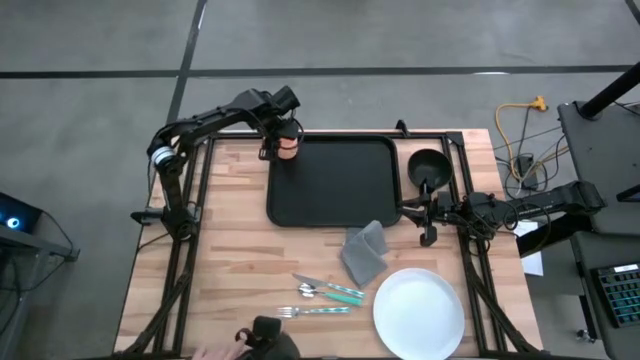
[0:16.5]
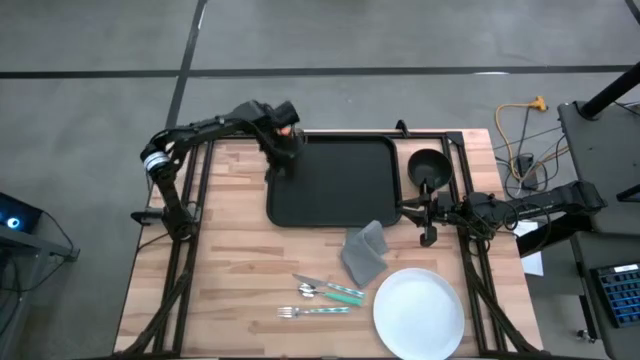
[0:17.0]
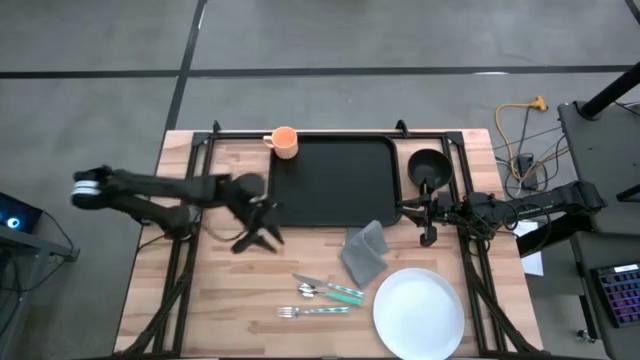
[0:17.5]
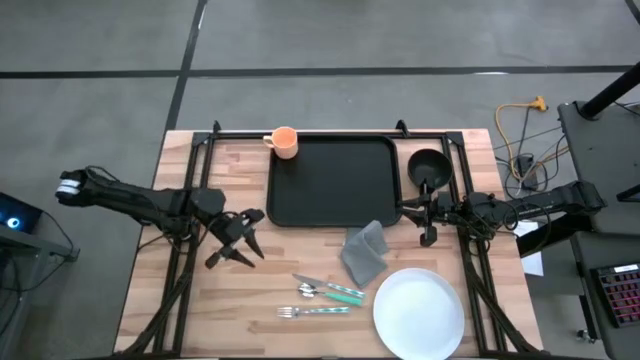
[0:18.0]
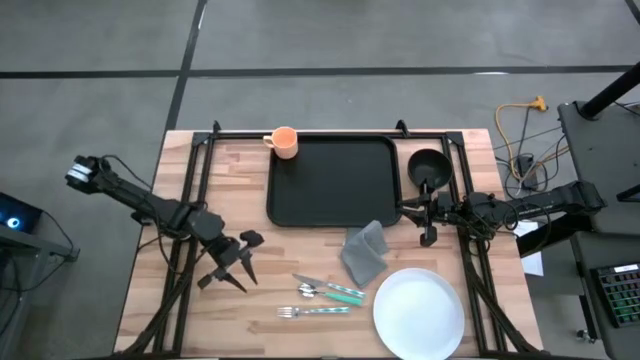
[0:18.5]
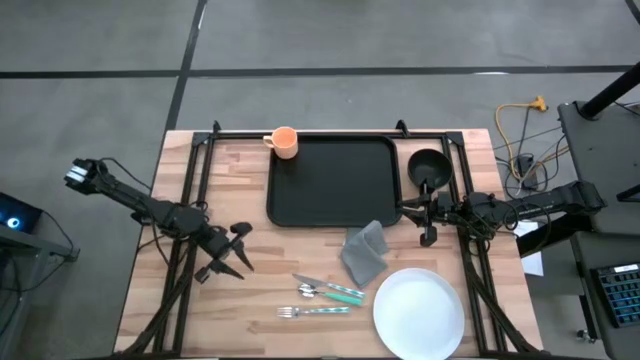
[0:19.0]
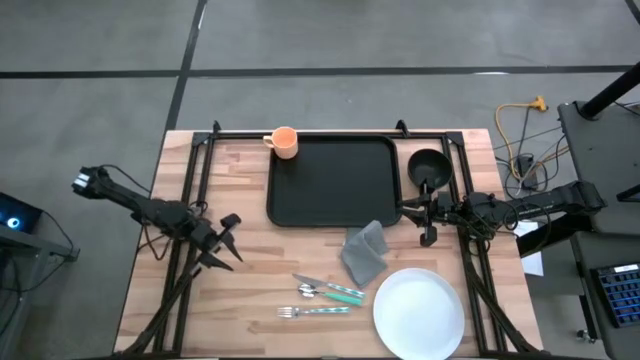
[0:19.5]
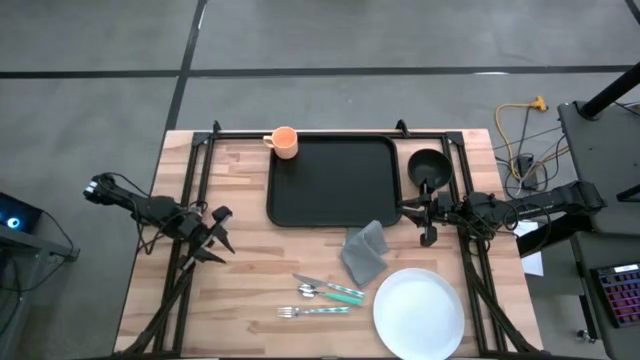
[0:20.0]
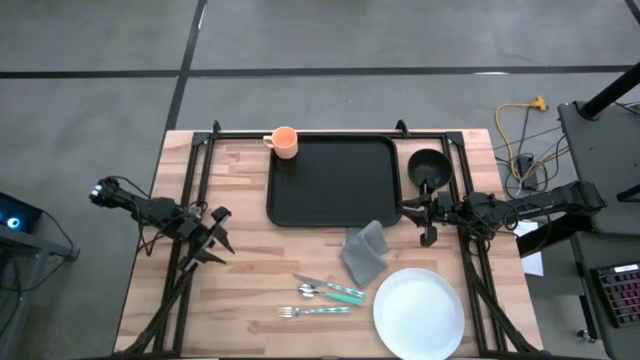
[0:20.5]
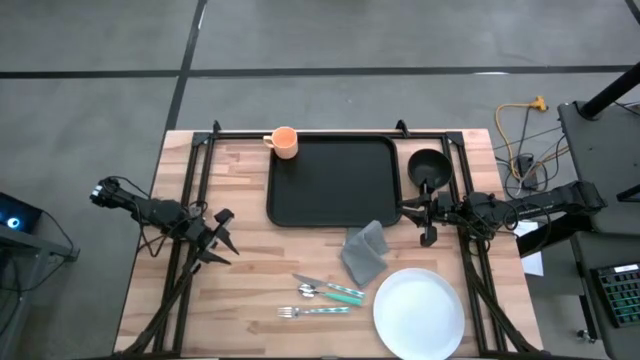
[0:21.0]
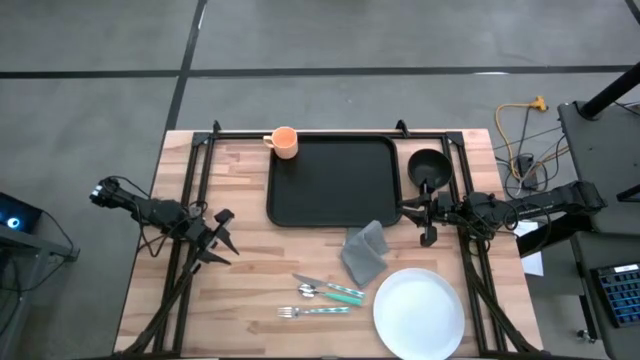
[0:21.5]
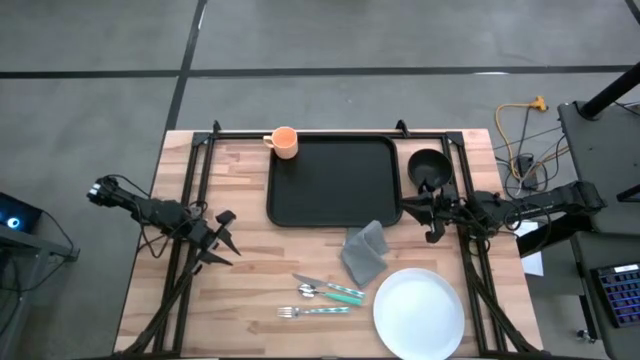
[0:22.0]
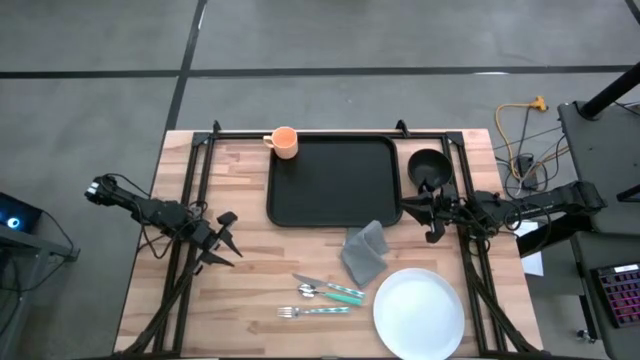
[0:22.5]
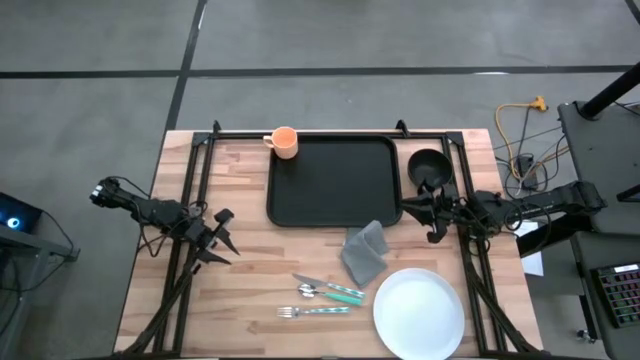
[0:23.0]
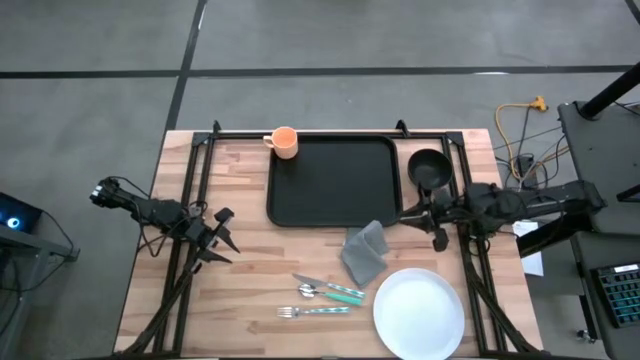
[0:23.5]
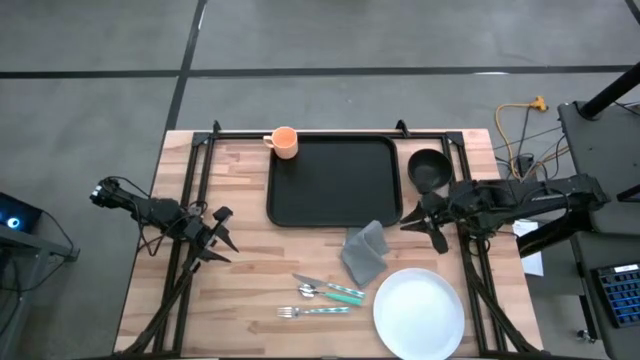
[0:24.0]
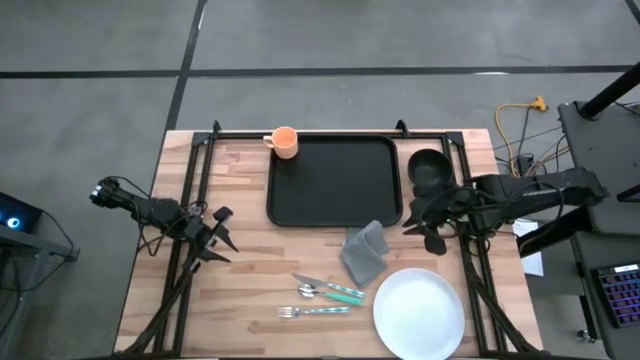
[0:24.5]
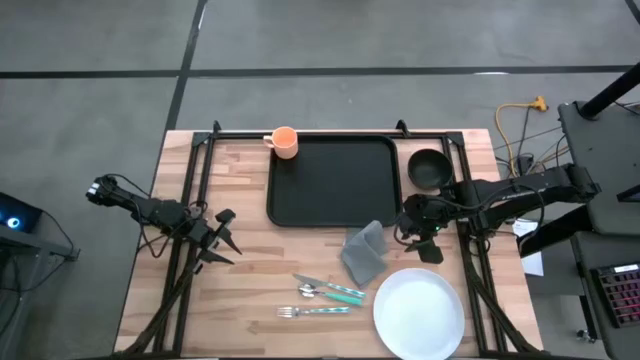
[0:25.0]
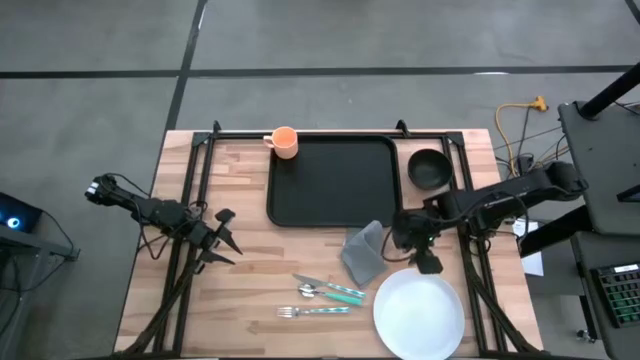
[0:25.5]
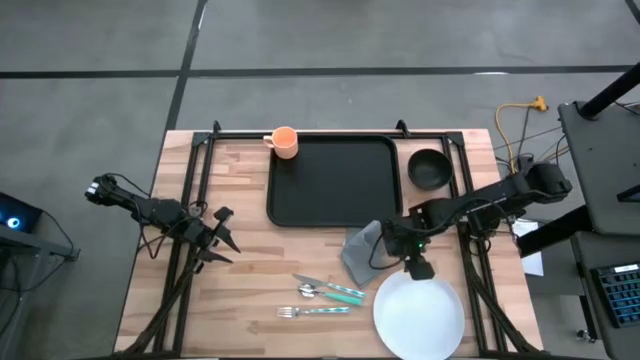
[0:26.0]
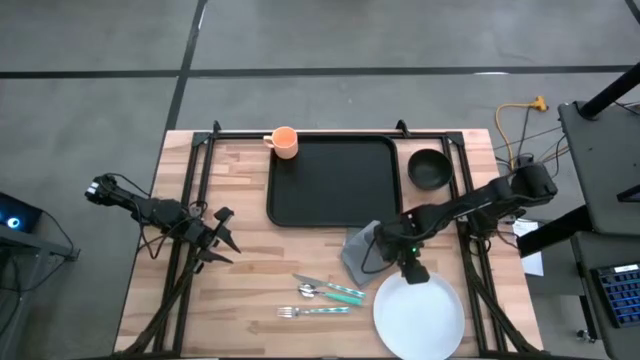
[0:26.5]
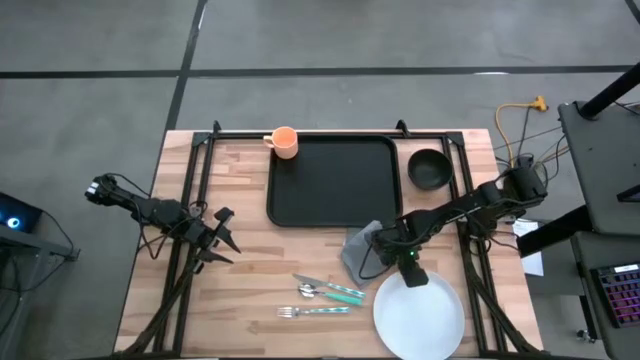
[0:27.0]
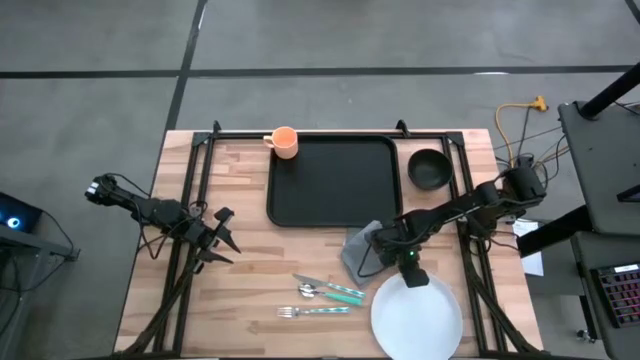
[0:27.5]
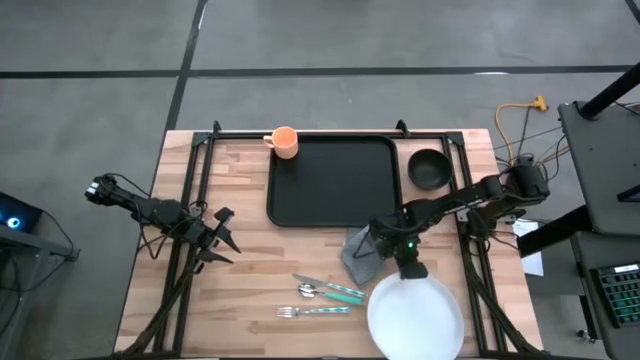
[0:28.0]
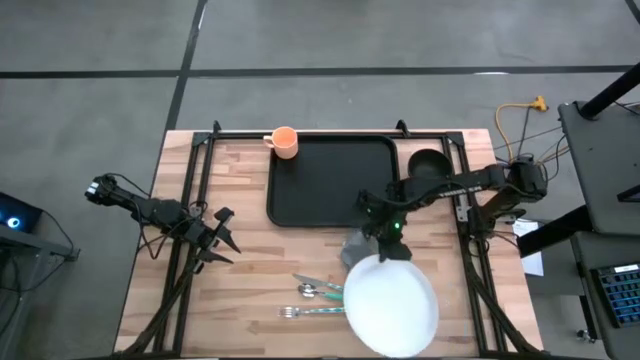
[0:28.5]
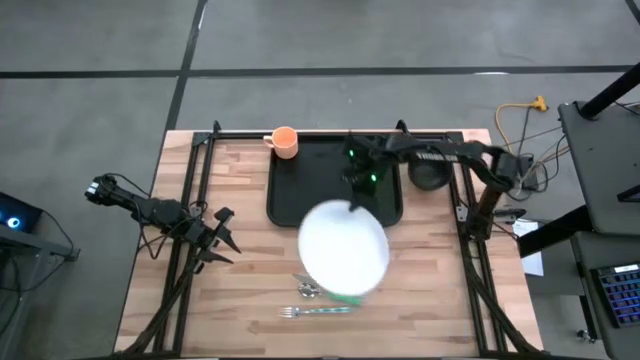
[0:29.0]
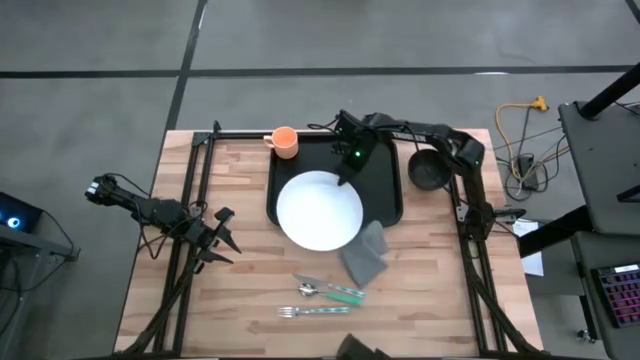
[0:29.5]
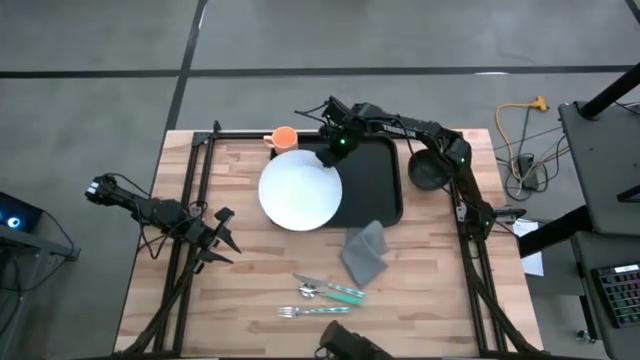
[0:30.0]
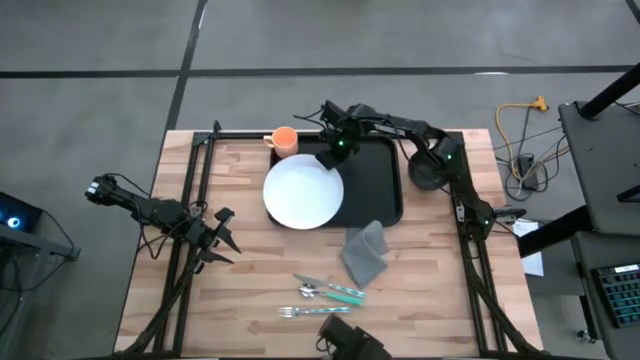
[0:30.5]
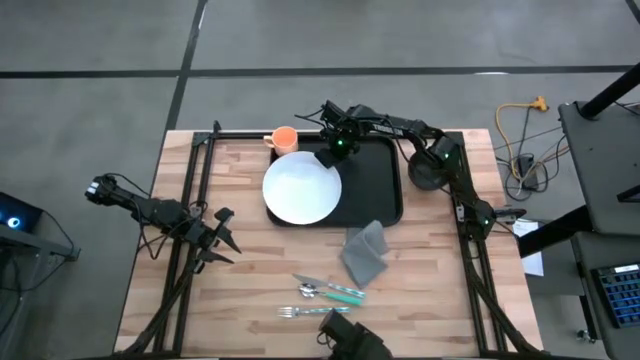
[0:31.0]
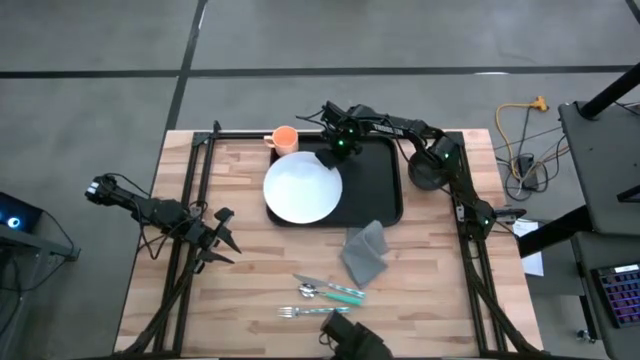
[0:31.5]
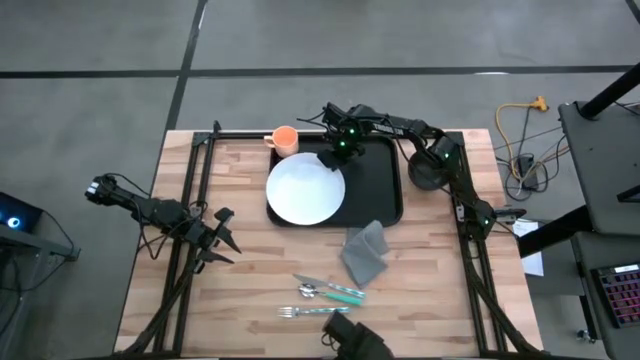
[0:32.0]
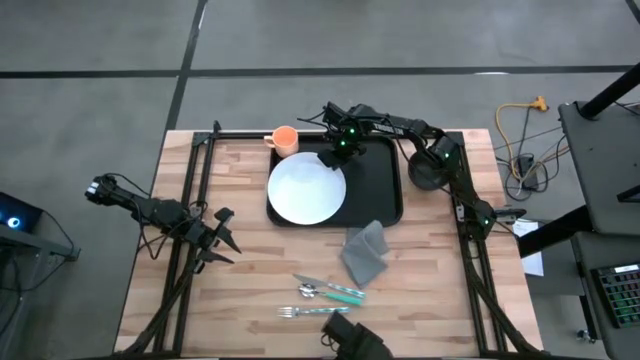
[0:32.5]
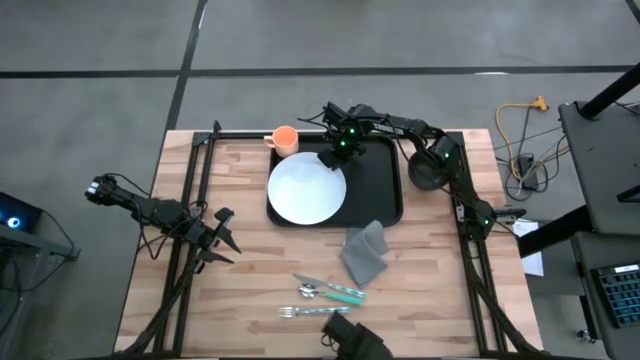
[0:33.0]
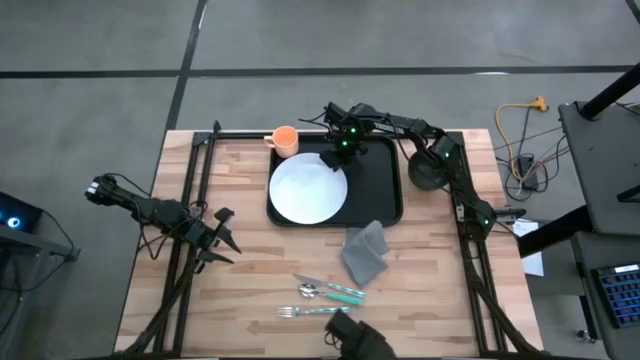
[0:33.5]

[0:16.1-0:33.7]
Task: Set up tray
Put the white plate on the bottom left side of the black tray

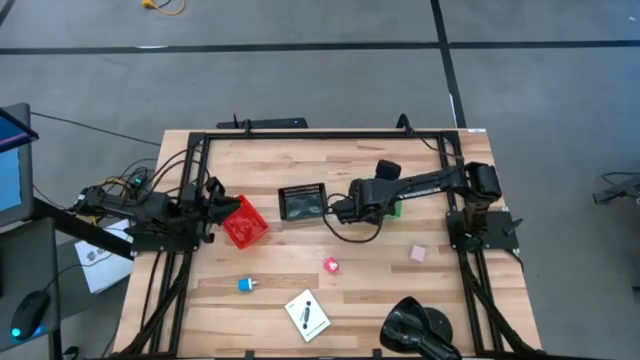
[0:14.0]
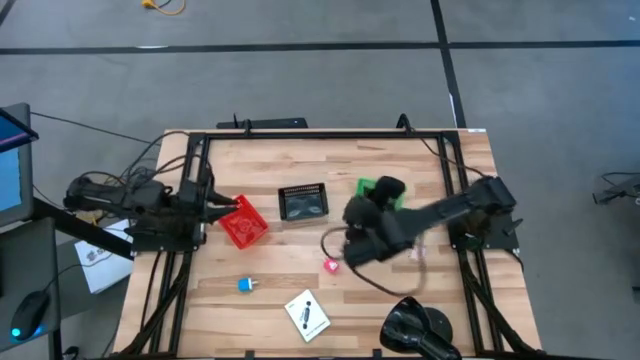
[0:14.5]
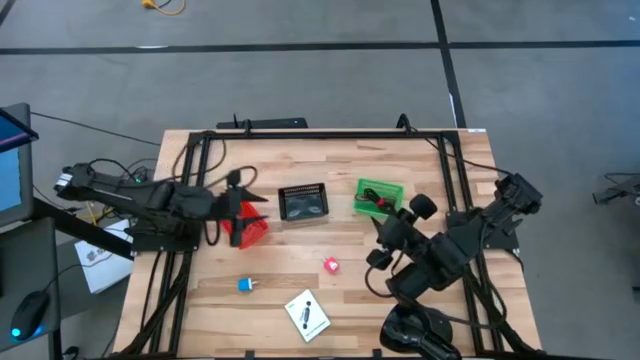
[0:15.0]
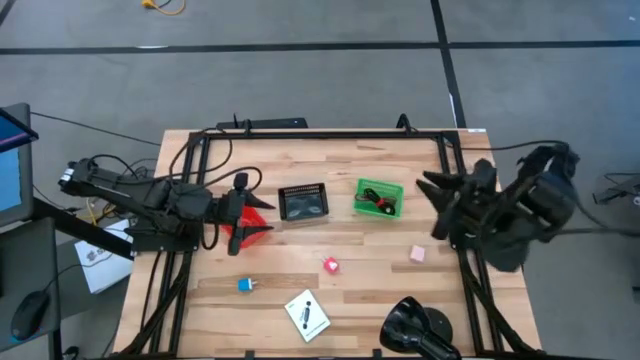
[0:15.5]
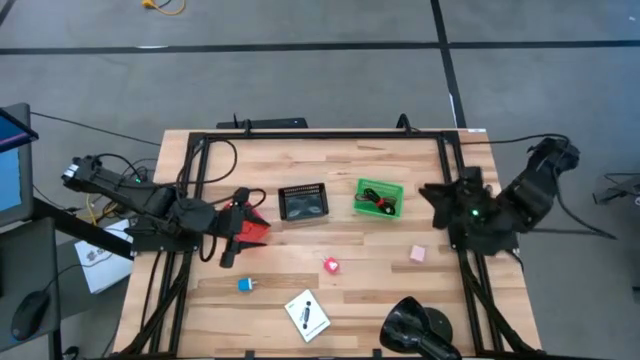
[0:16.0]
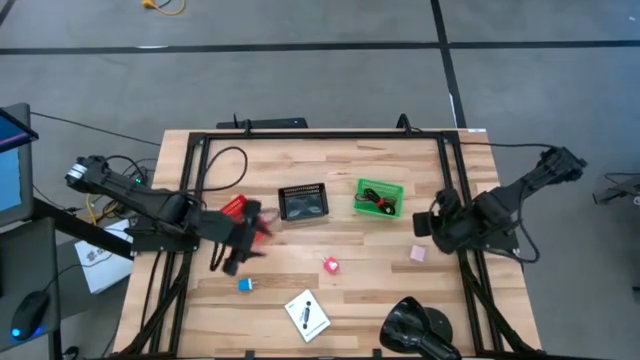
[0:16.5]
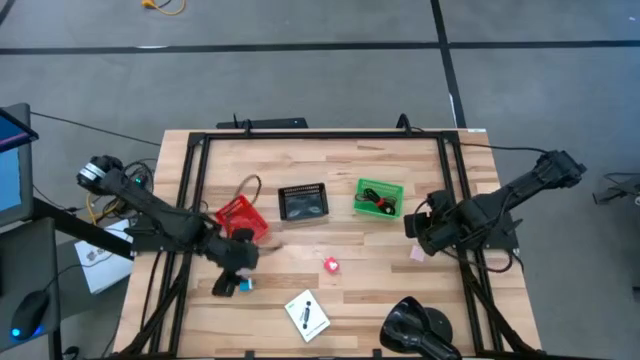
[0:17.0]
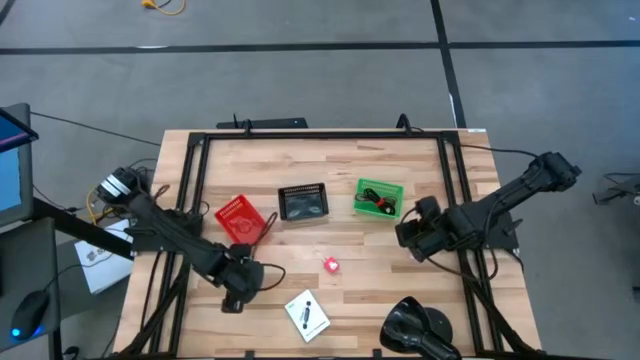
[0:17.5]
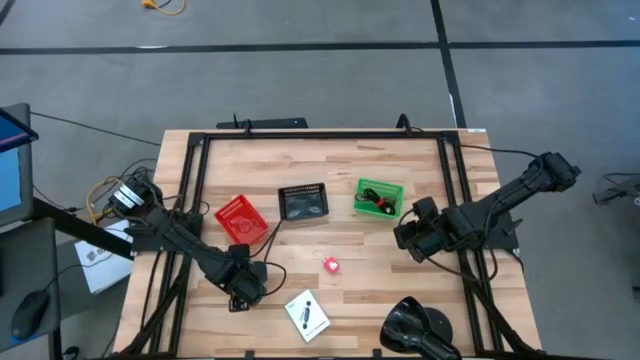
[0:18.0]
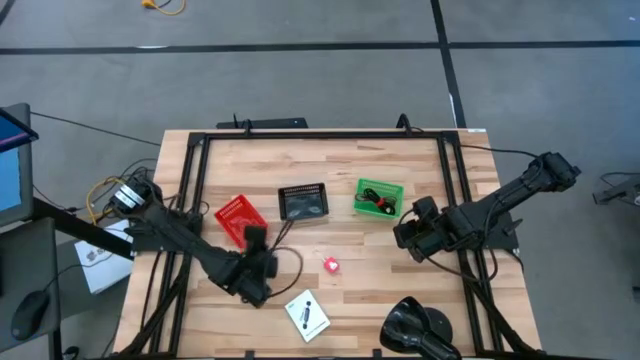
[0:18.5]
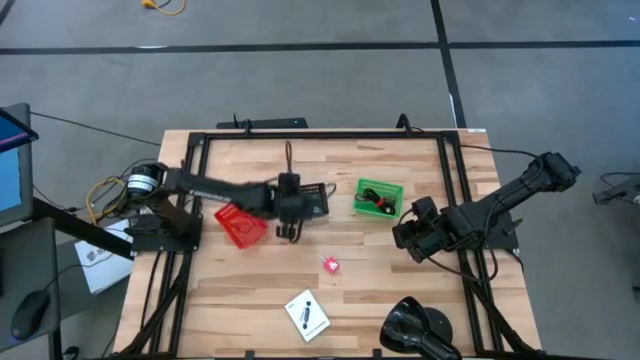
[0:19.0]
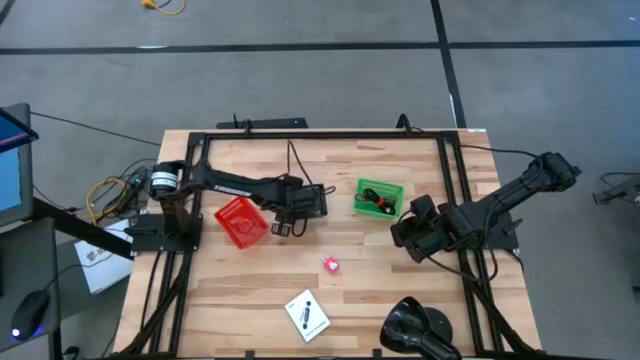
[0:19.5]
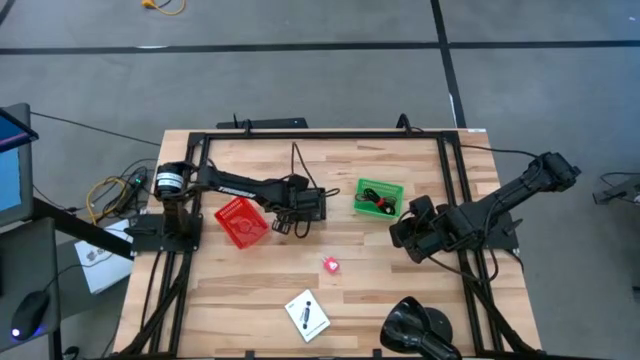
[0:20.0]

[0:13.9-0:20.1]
Task: Pick and place items into bin
Put the blue charger adapter into the black bin
